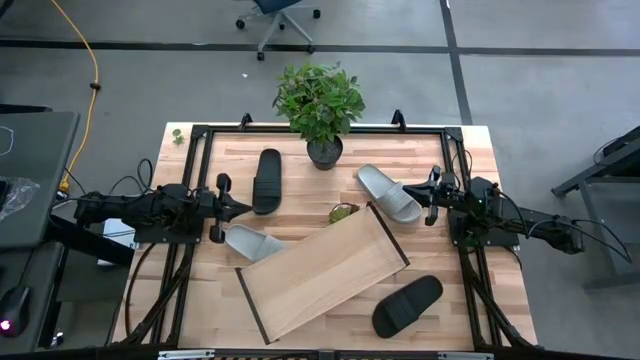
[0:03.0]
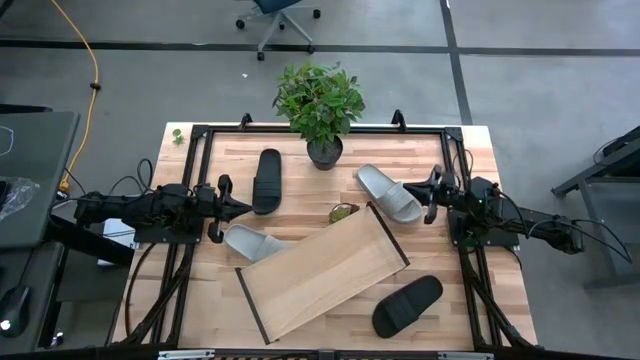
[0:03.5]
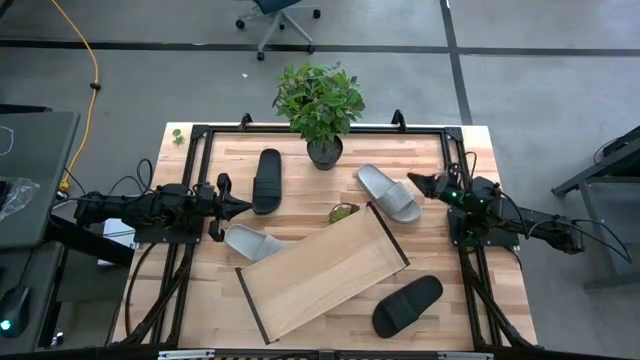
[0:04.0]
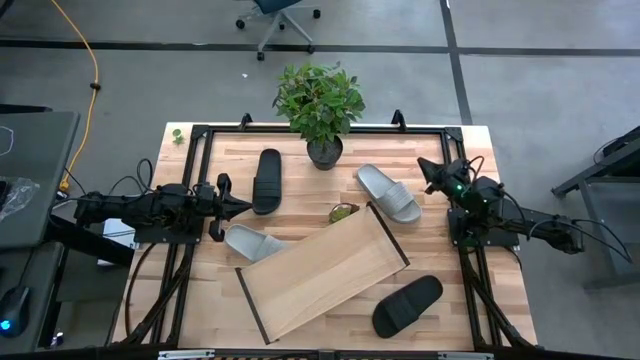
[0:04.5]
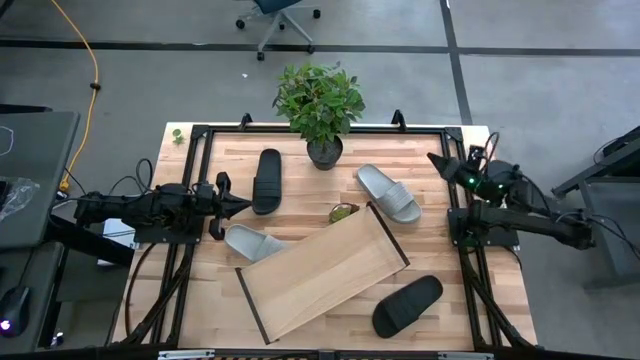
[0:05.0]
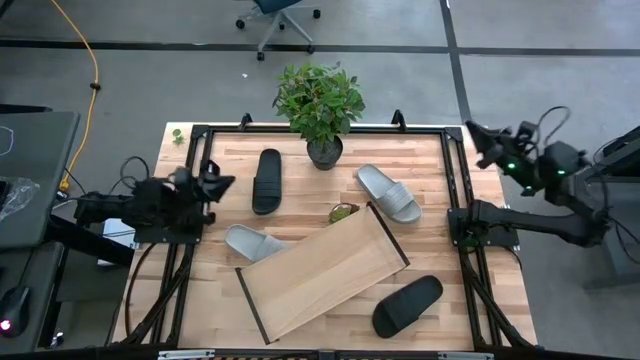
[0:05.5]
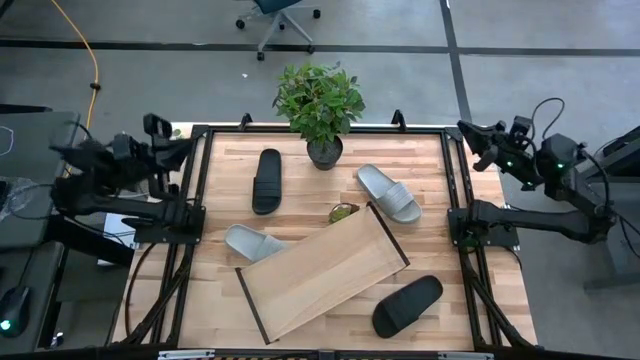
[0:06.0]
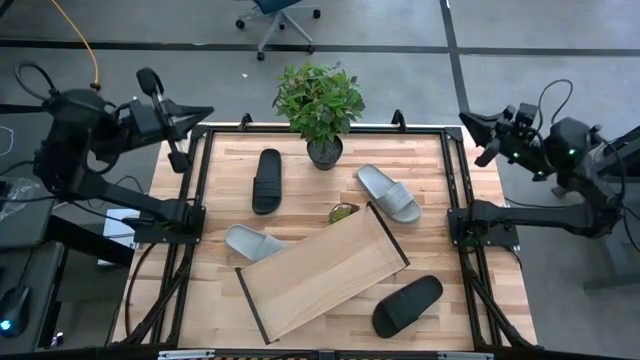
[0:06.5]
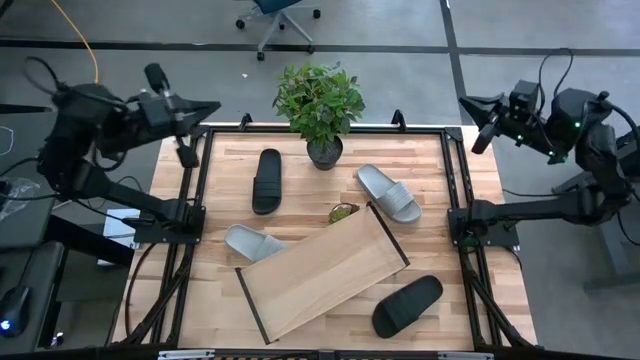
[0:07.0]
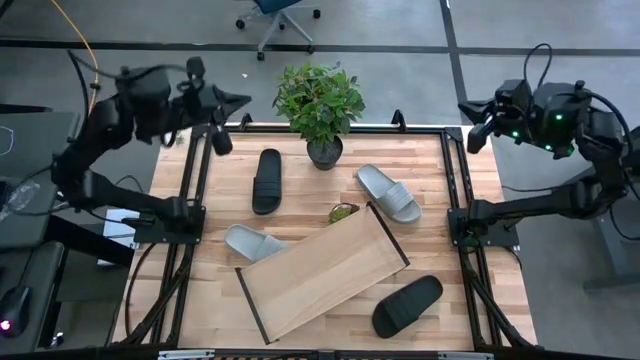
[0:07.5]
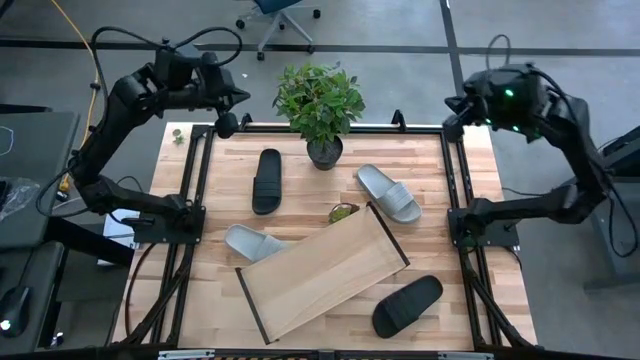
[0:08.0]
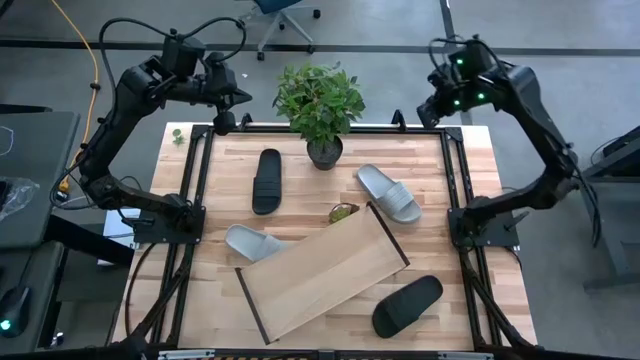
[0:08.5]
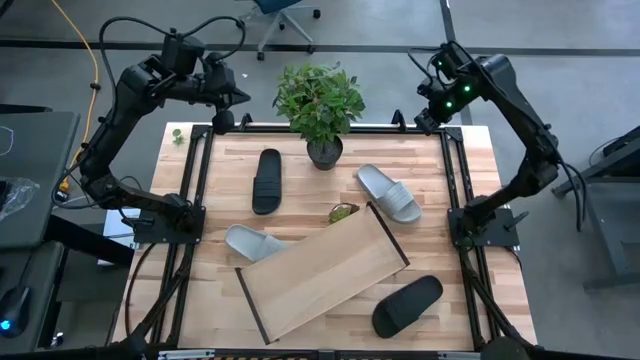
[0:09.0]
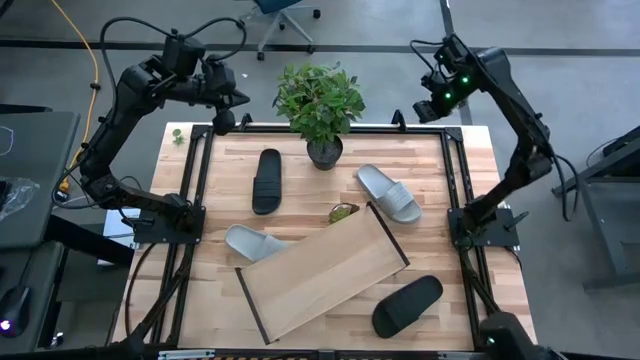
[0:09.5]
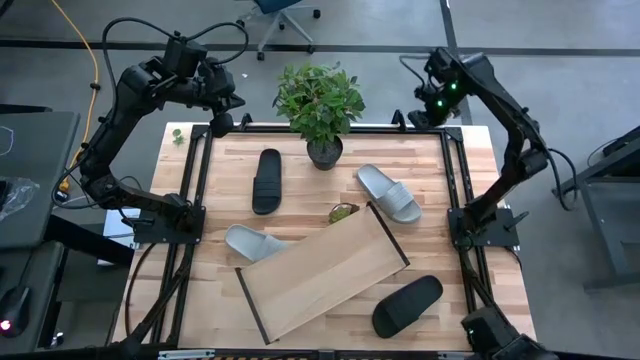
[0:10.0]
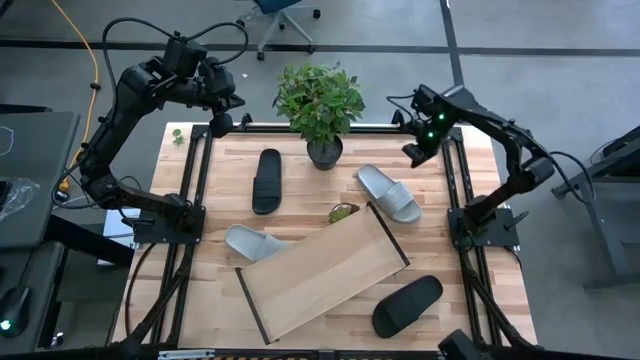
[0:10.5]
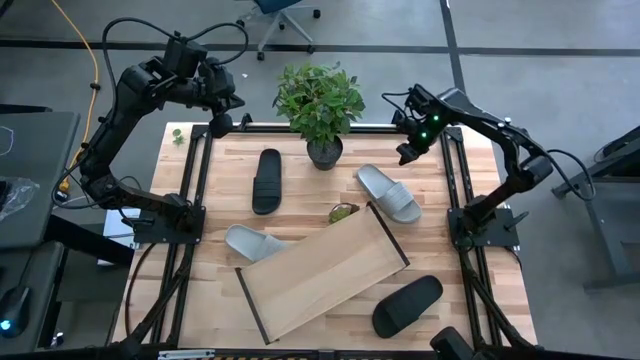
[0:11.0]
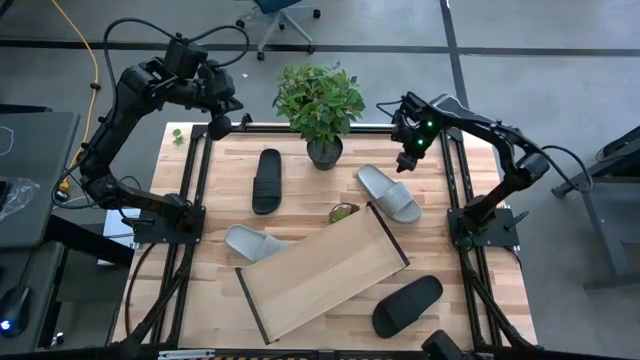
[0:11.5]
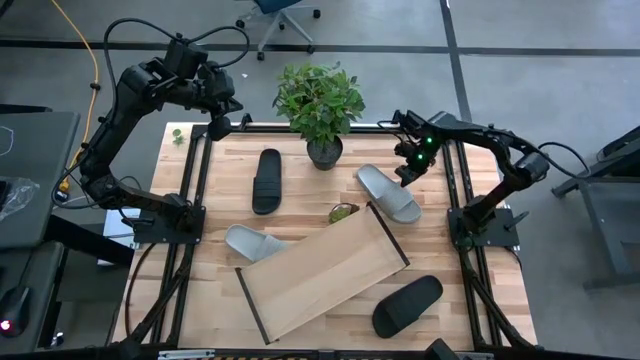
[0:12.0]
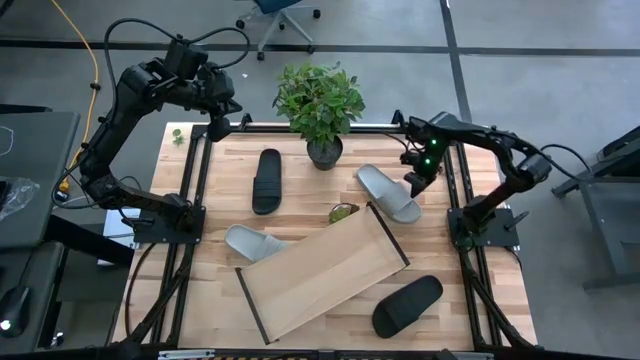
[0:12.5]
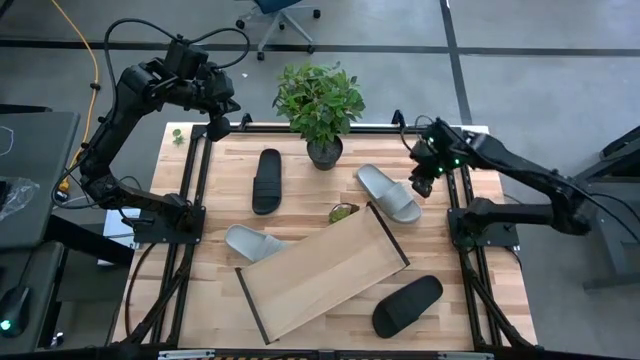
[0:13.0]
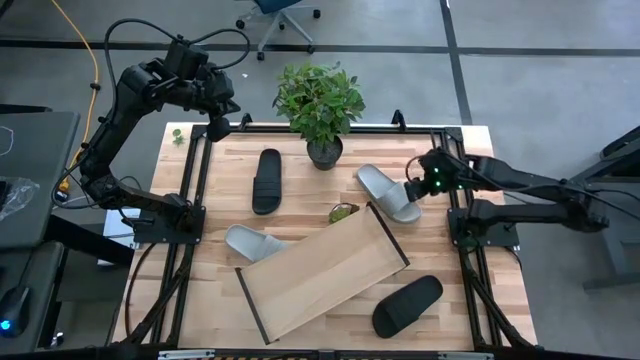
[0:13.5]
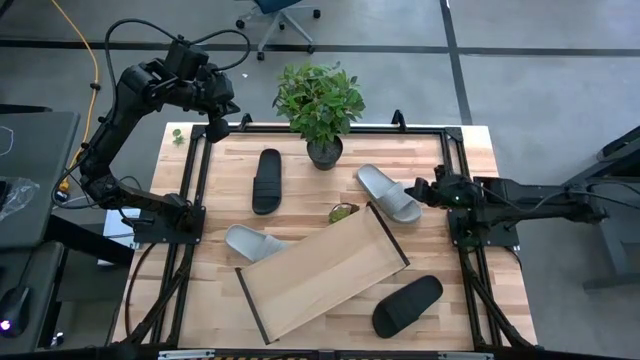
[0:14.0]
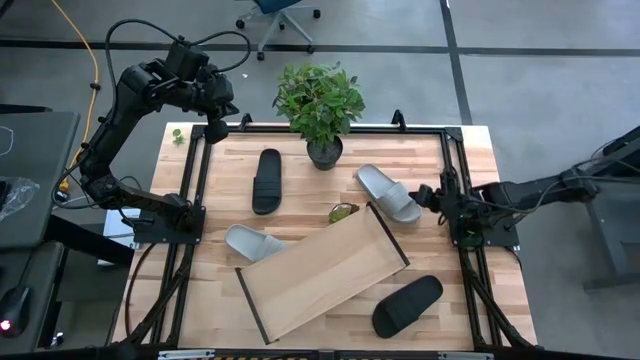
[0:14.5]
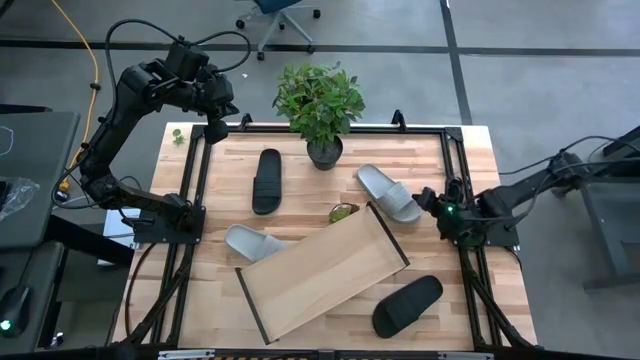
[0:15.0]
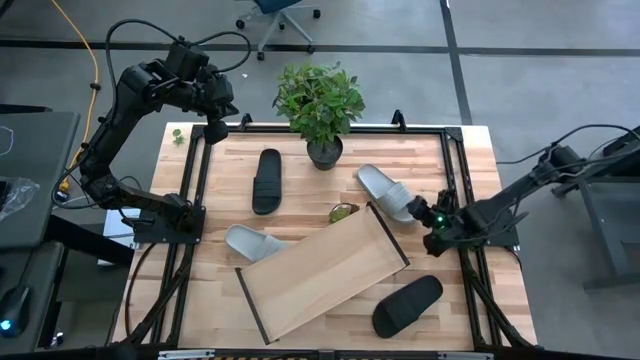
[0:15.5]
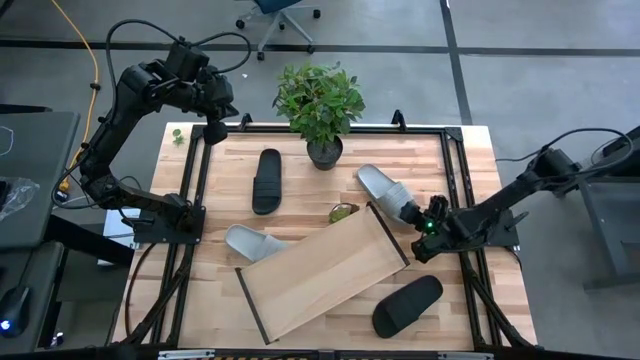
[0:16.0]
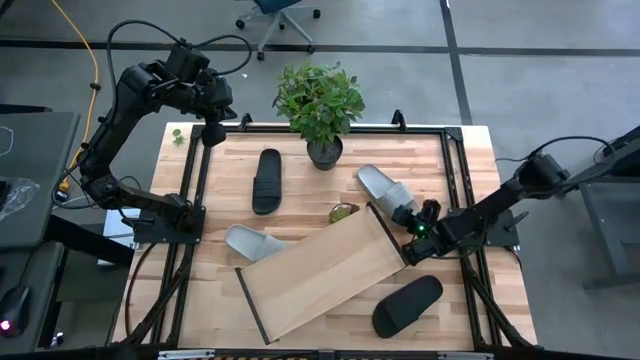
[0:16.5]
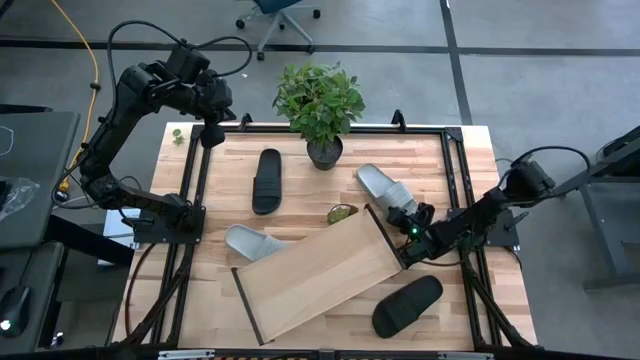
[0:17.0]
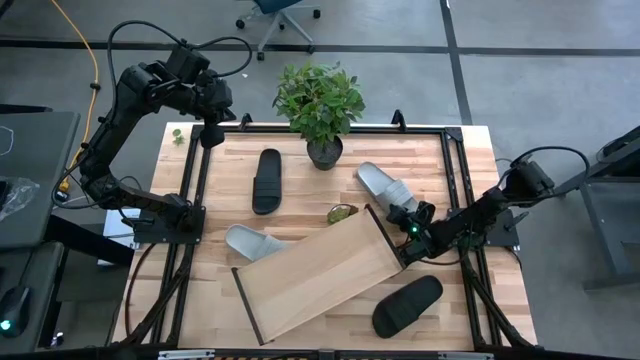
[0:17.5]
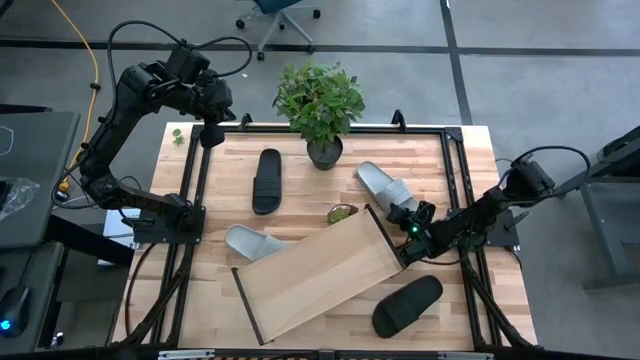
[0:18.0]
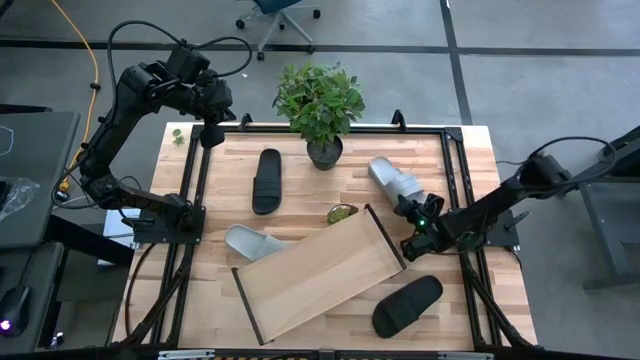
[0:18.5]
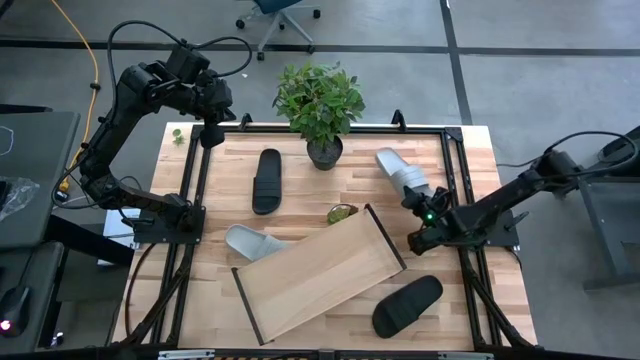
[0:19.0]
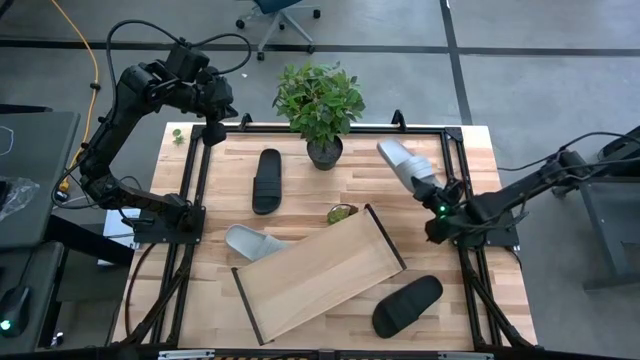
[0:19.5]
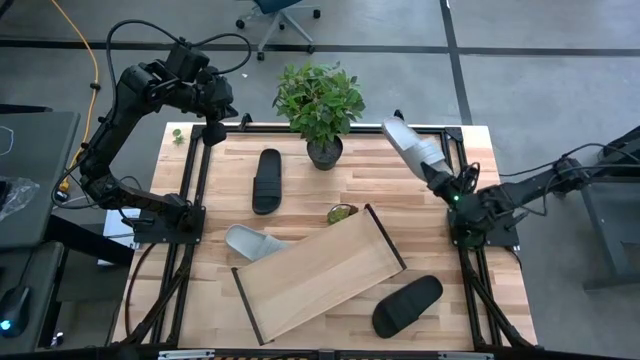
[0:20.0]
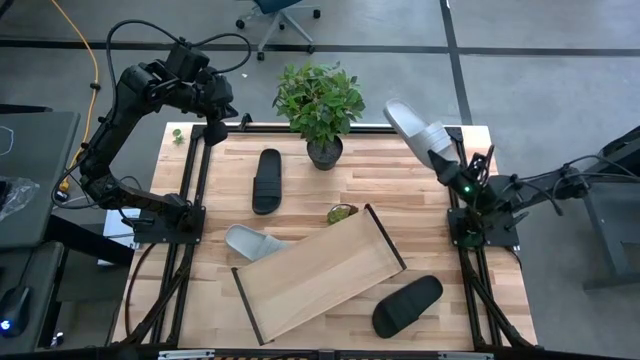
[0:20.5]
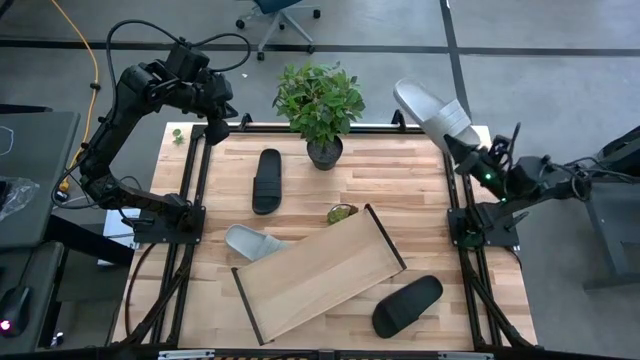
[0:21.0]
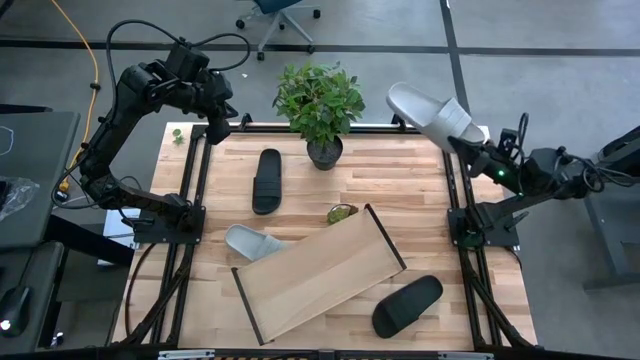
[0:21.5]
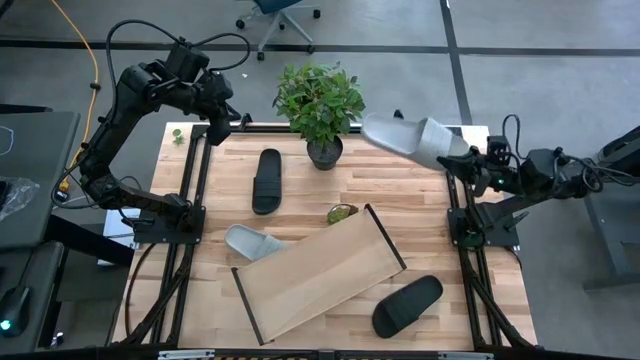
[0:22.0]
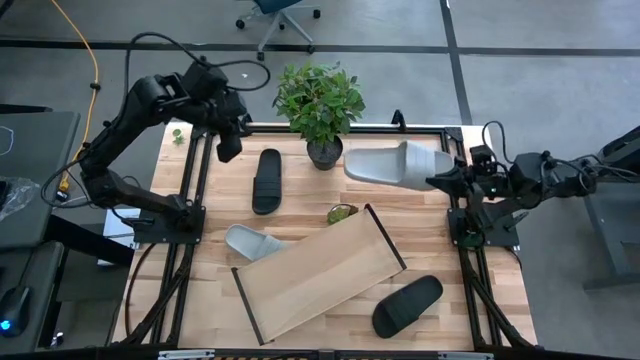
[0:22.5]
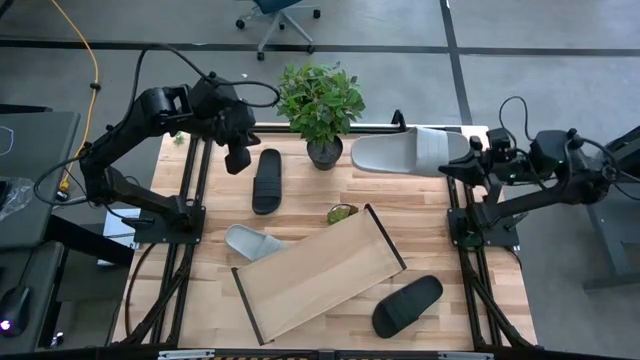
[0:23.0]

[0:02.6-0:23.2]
Task: Pick and place slides into the shelf
Put the right gray slipper on the shelf
